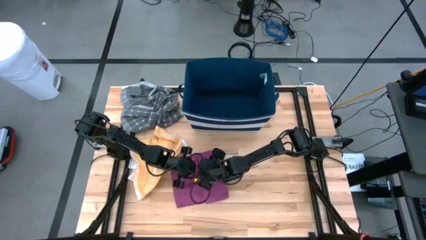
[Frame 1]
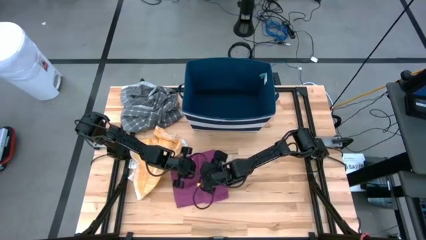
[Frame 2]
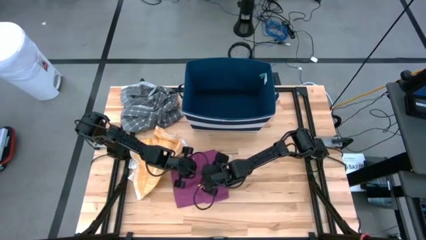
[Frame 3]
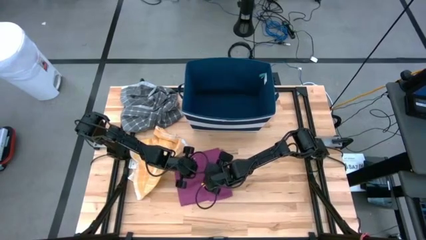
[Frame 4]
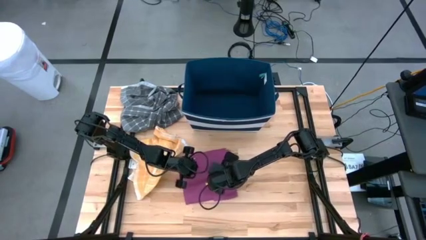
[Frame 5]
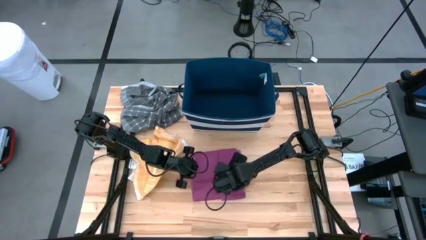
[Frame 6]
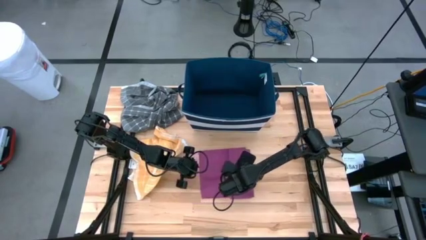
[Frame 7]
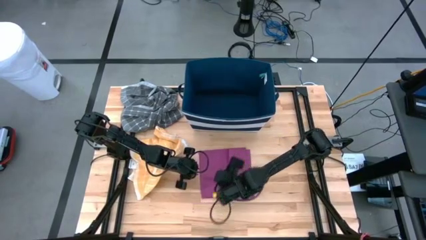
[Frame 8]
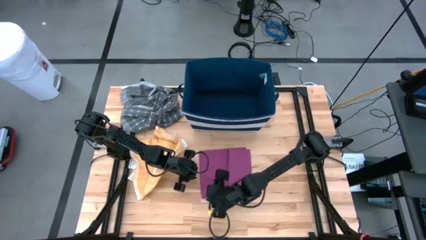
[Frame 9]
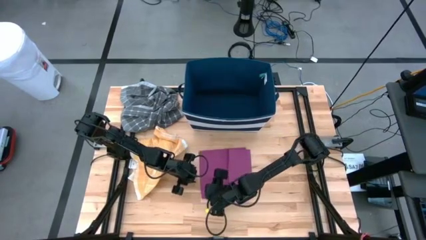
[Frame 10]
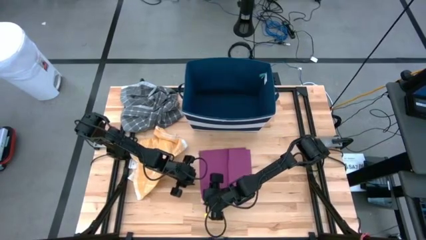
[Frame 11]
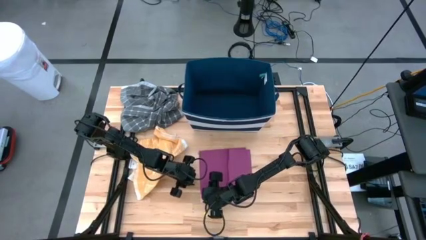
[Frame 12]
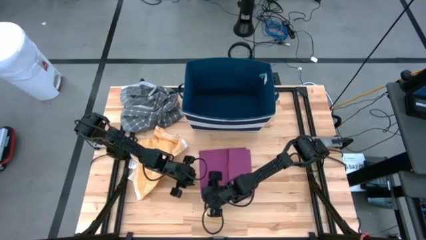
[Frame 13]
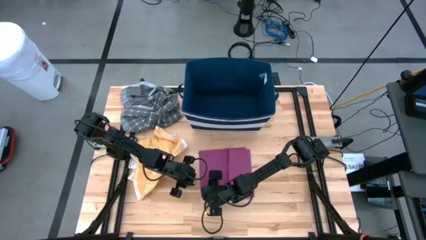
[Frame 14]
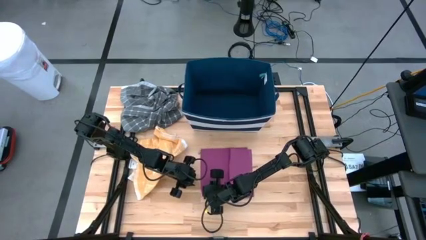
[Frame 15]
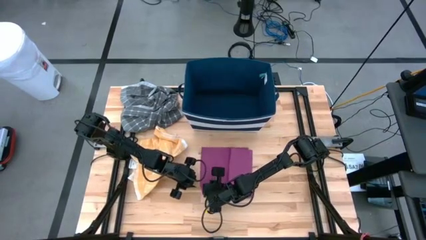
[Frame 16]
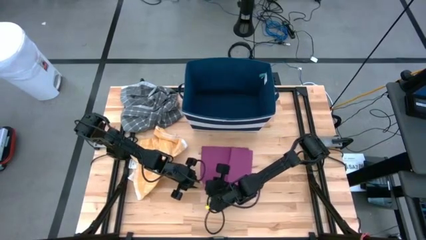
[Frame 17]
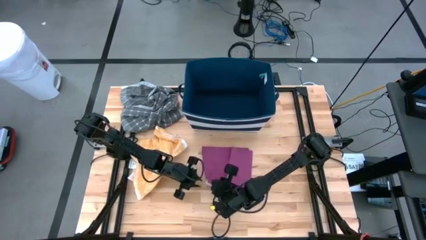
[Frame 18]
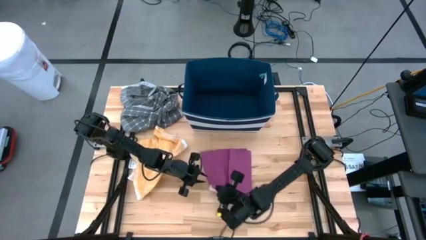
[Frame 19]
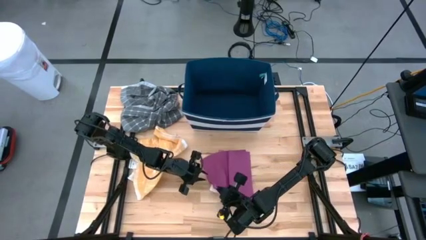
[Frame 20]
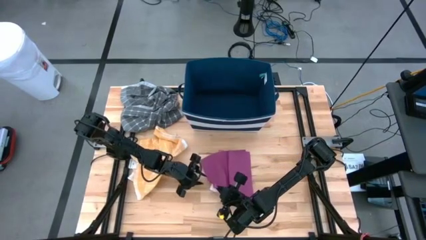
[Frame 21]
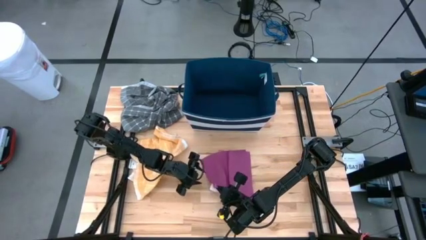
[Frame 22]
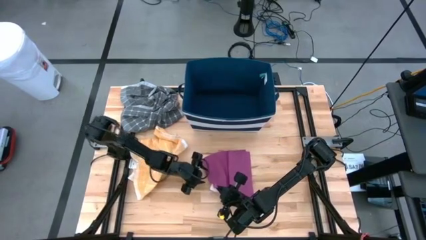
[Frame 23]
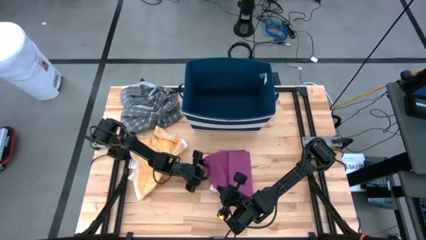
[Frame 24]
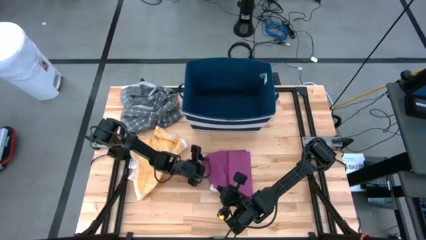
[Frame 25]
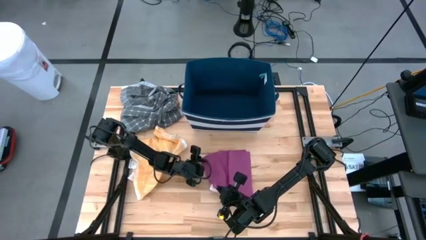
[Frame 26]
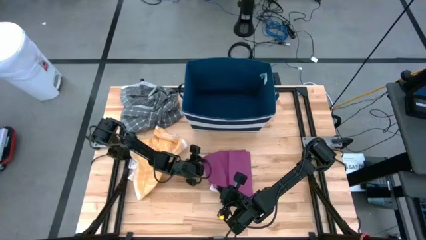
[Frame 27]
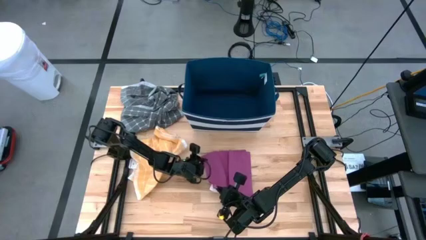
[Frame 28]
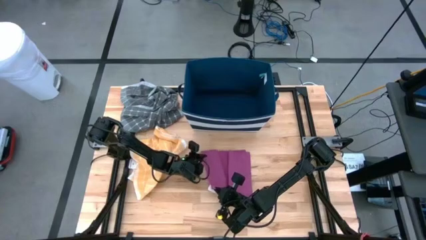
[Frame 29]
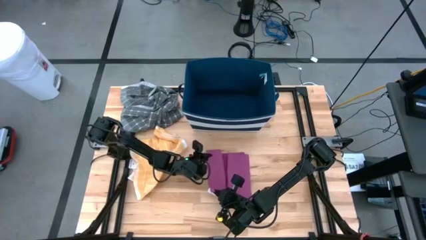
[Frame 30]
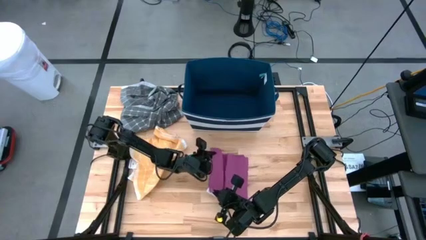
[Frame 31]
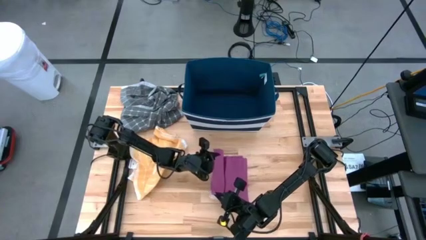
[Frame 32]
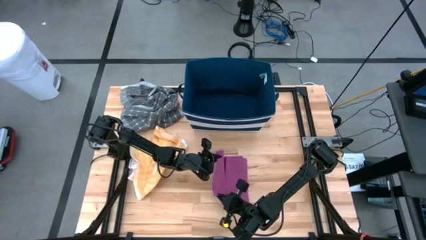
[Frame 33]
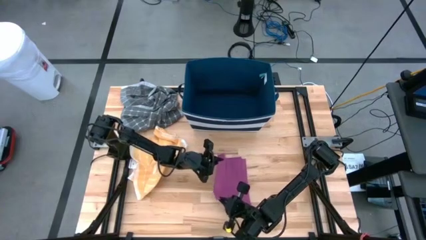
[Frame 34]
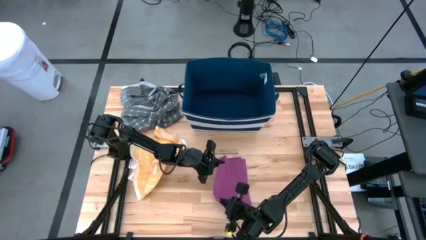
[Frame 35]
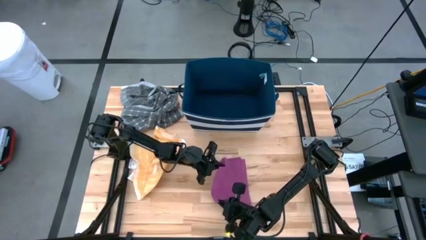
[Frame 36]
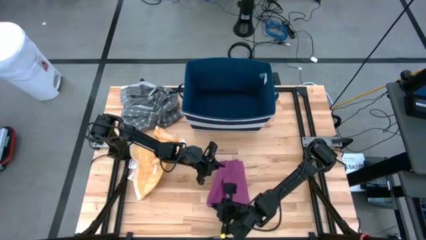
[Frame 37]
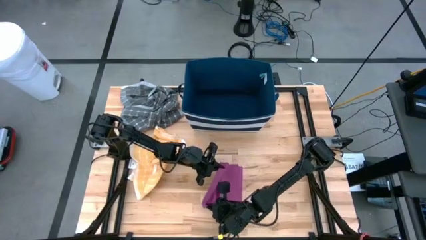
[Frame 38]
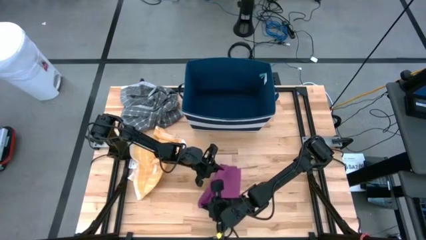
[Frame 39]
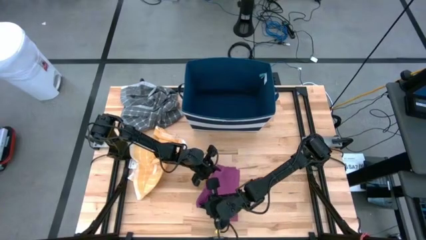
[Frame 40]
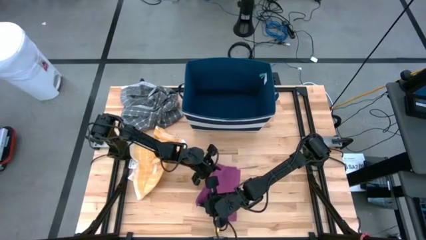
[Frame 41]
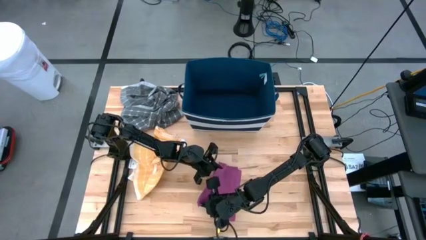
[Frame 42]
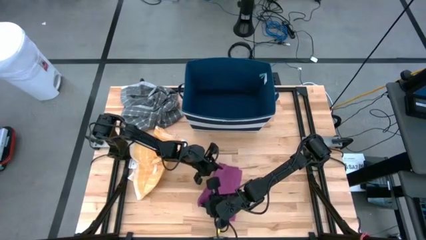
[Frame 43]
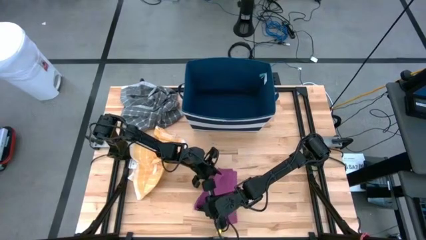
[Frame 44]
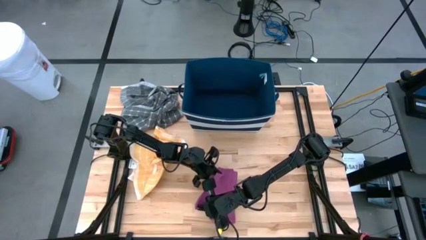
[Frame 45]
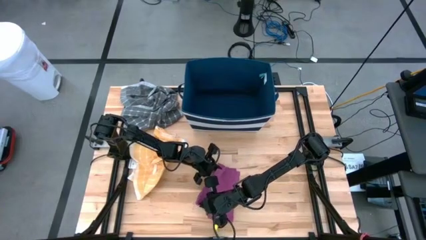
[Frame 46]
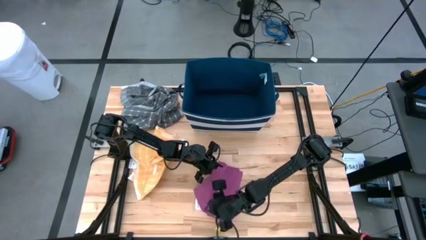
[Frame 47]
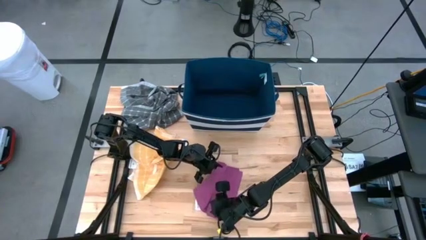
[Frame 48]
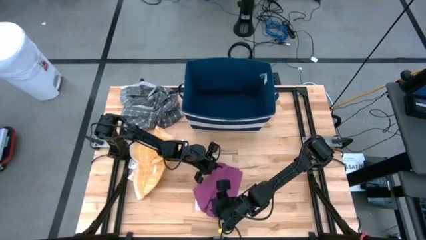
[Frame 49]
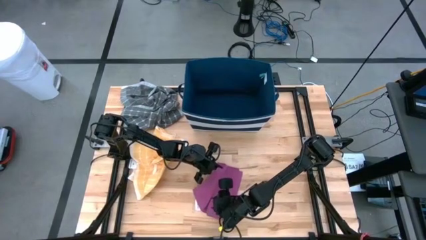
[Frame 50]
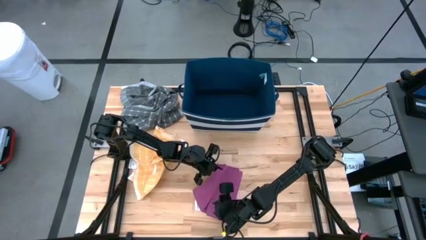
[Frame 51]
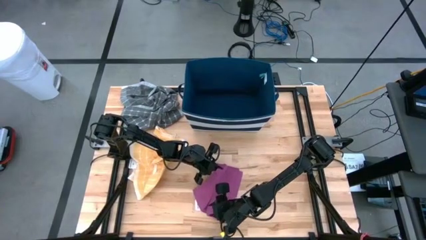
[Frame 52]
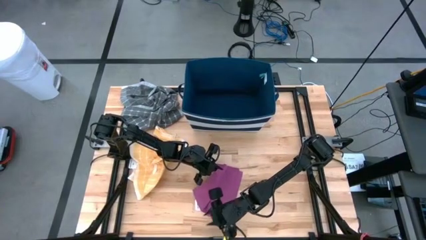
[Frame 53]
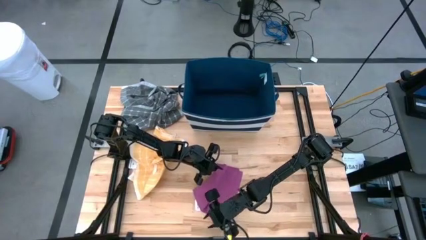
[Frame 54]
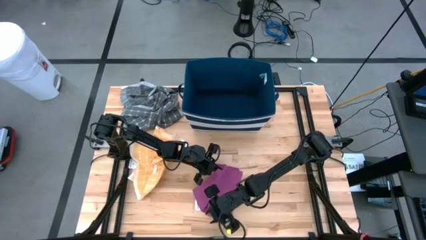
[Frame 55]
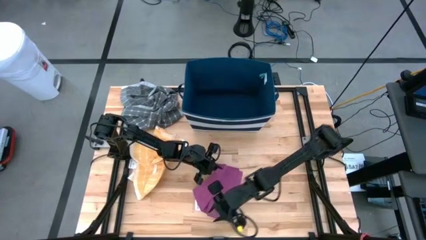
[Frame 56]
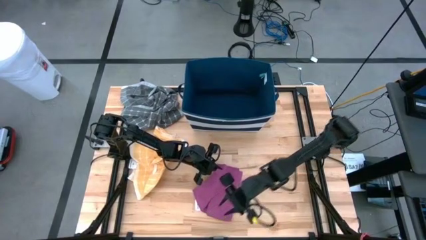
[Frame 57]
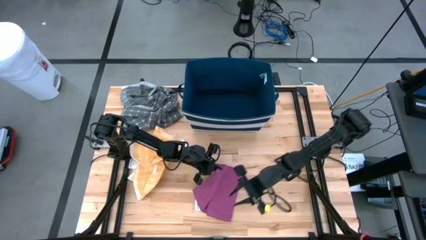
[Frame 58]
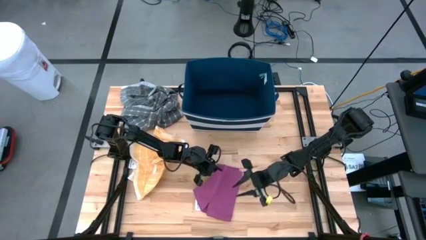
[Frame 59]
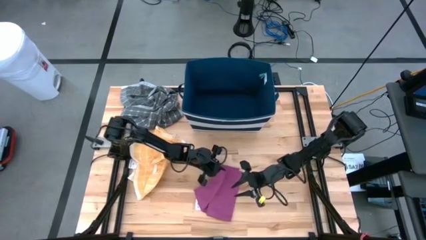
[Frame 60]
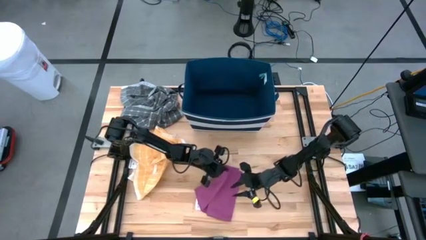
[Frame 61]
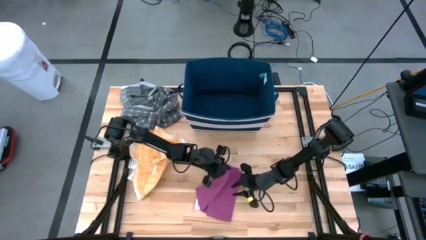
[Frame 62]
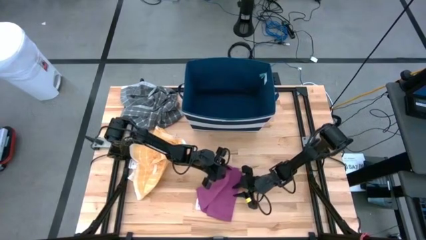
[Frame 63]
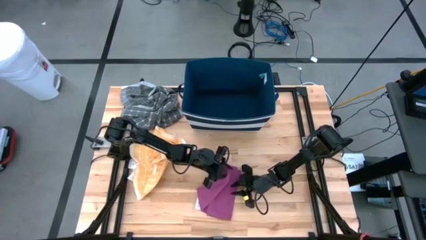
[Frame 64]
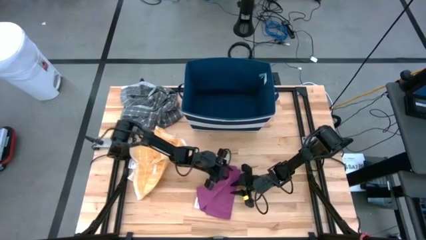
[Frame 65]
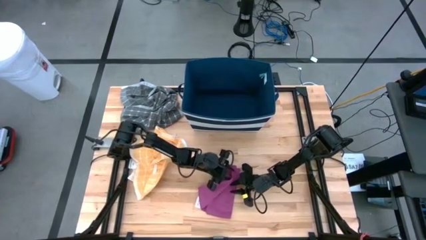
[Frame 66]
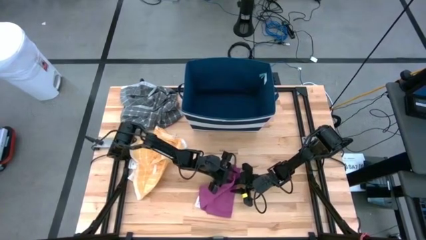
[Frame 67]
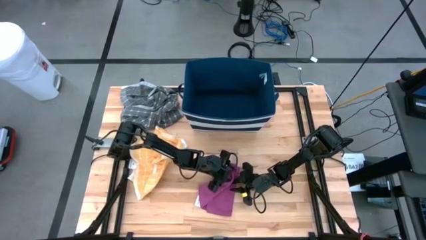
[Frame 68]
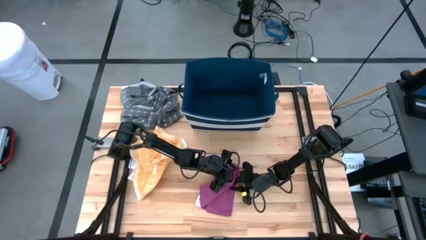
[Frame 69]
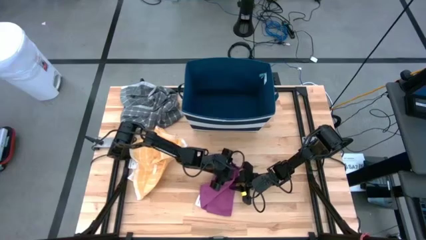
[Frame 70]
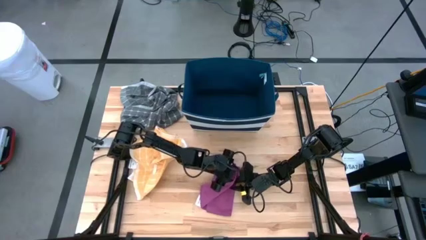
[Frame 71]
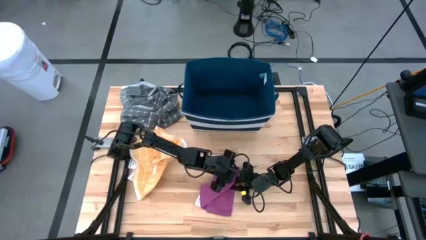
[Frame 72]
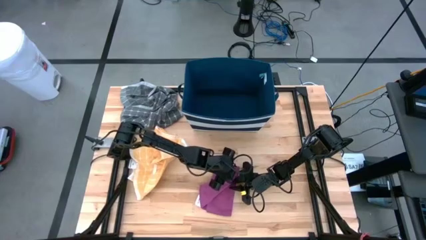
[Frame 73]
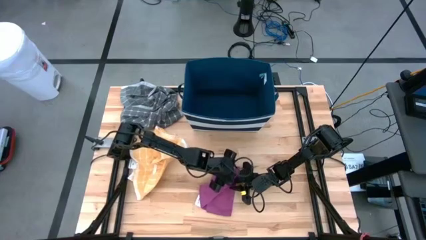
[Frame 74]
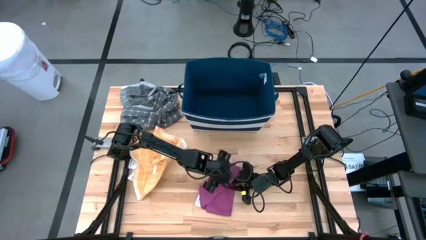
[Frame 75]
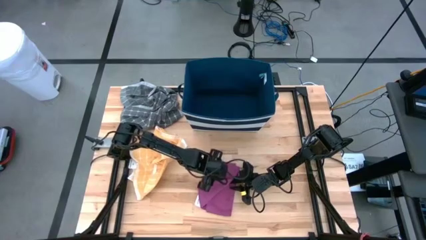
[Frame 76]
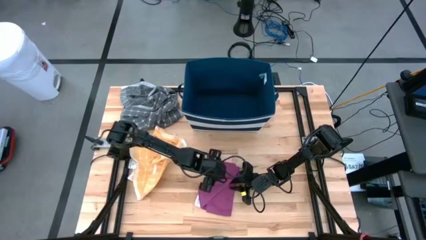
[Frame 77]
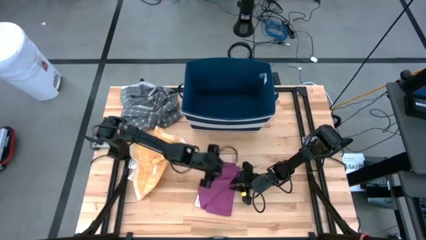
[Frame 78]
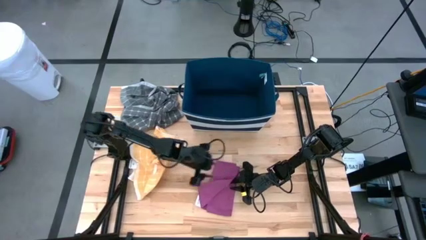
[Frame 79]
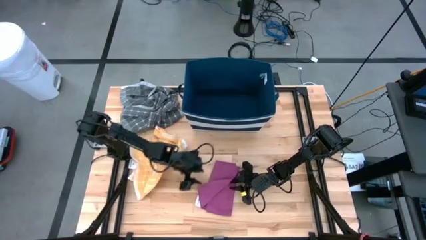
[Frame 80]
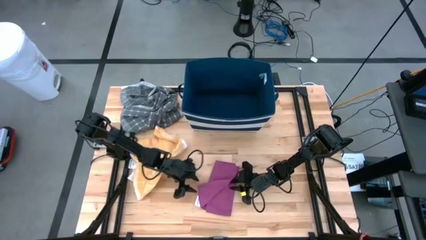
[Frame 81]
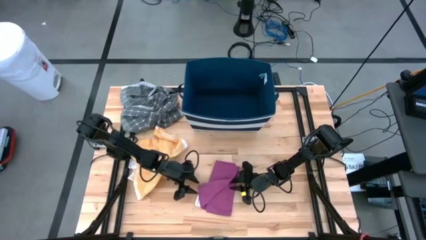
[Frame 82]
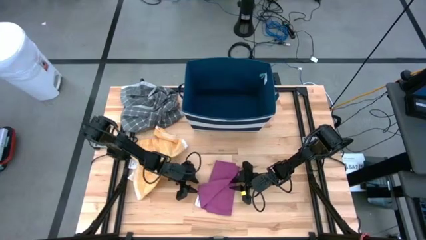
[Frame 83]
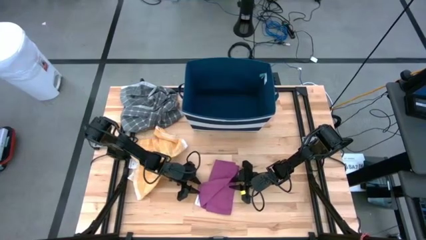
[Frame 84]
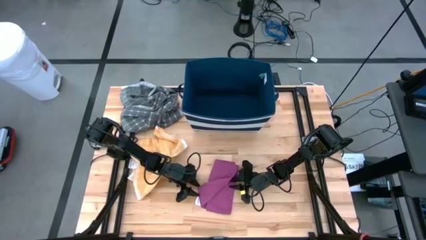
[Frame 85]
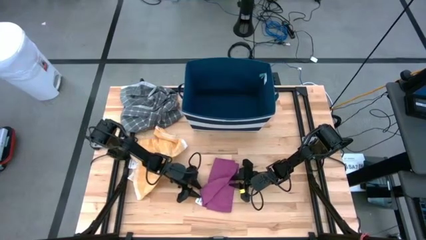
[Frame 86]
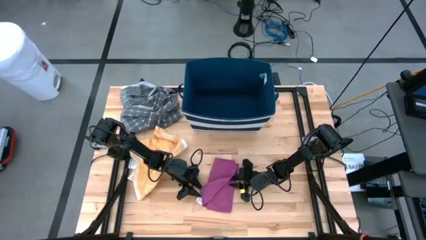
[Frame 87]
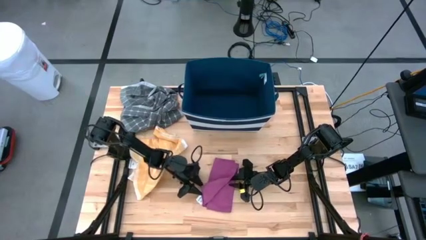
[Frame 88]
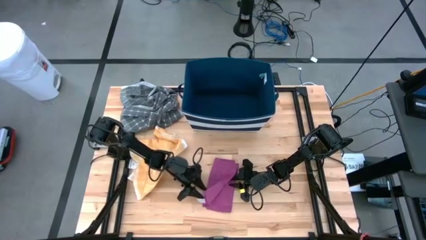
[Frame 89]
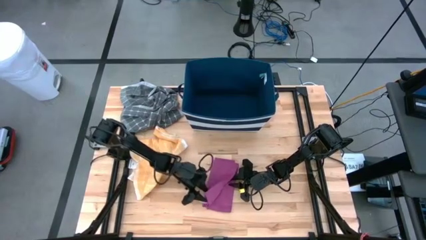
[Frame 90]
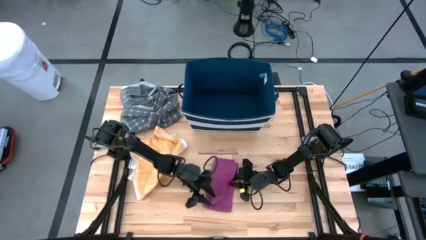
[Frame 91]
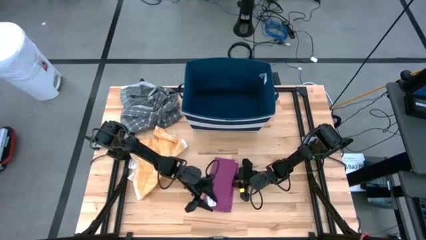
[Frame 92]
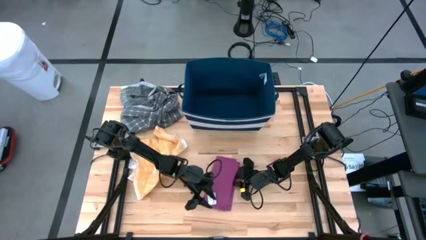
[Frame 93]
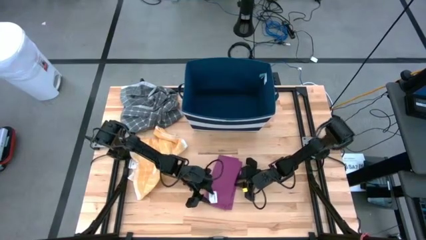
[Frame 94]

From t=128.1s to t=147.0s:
Task: Fold towel
Fold the purple towel
